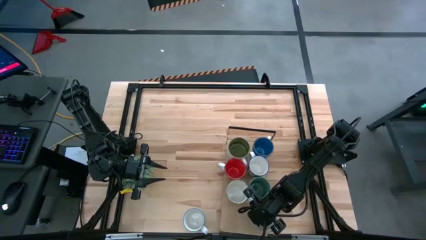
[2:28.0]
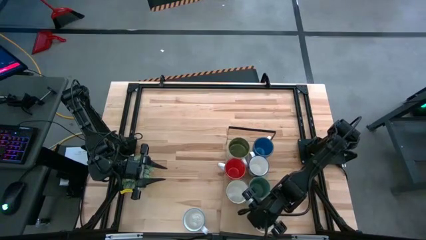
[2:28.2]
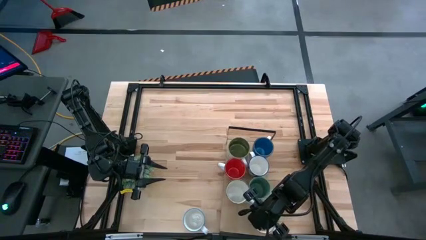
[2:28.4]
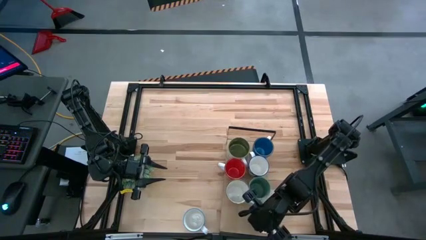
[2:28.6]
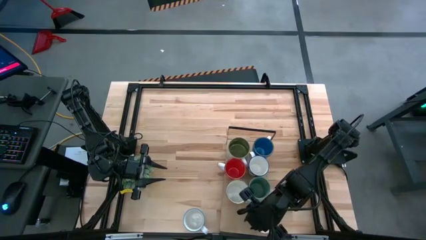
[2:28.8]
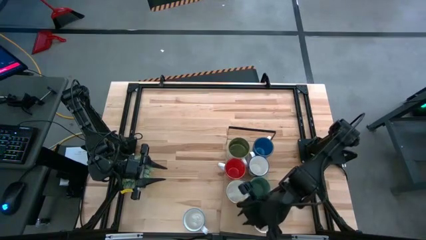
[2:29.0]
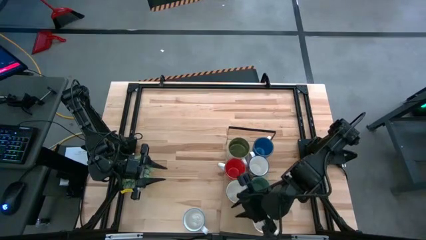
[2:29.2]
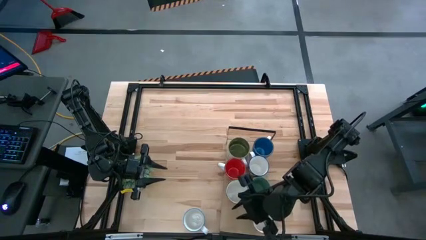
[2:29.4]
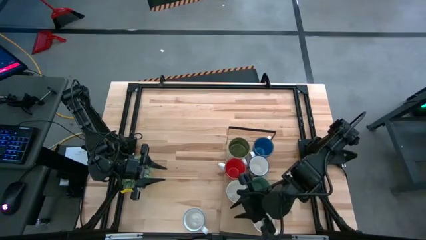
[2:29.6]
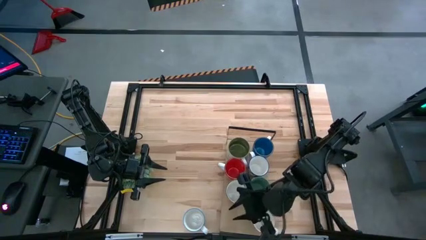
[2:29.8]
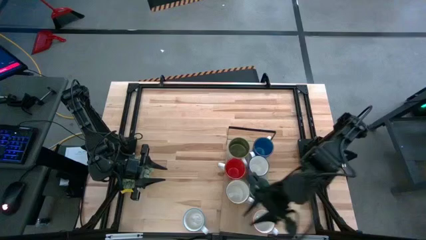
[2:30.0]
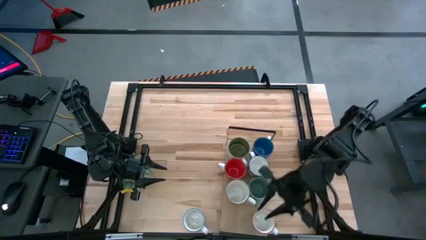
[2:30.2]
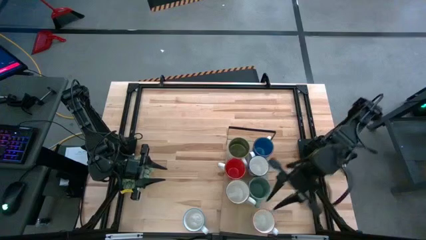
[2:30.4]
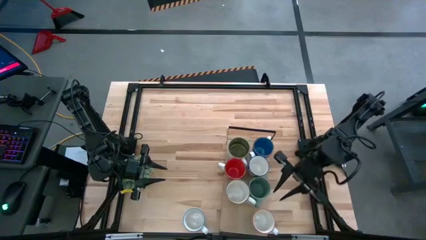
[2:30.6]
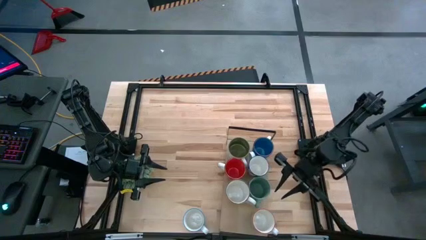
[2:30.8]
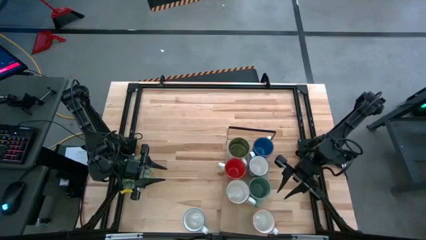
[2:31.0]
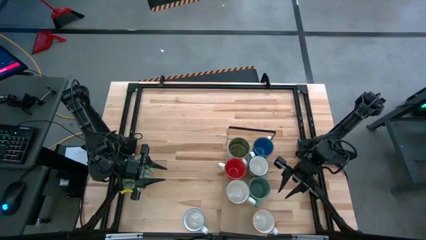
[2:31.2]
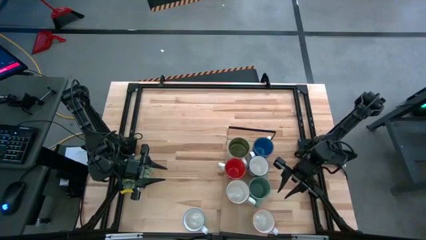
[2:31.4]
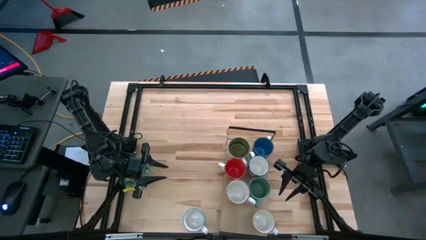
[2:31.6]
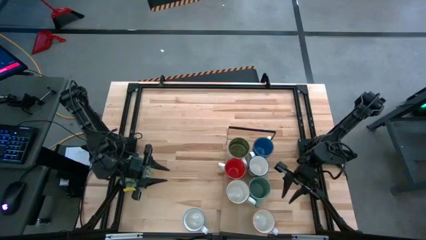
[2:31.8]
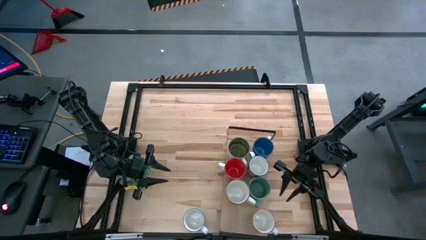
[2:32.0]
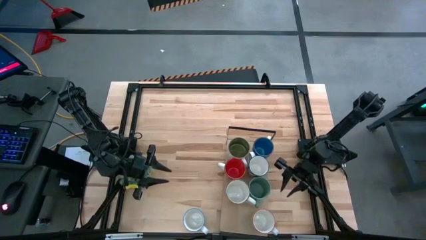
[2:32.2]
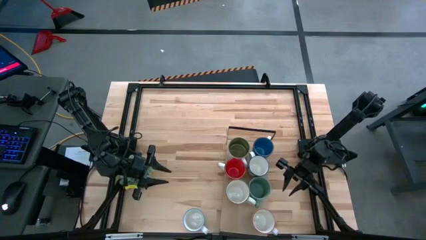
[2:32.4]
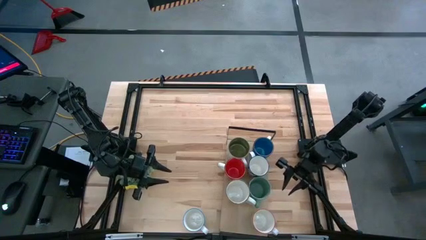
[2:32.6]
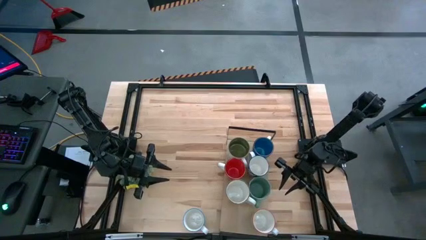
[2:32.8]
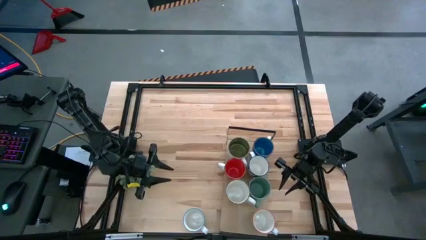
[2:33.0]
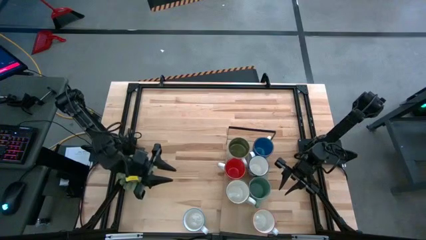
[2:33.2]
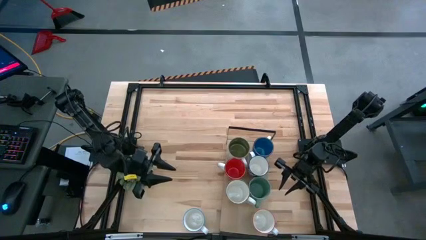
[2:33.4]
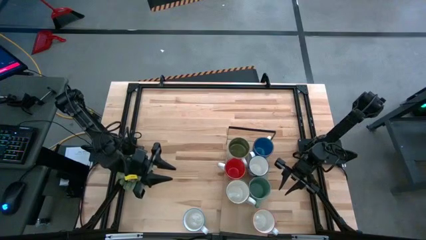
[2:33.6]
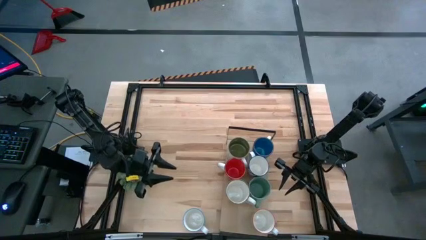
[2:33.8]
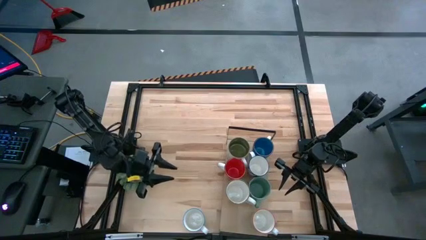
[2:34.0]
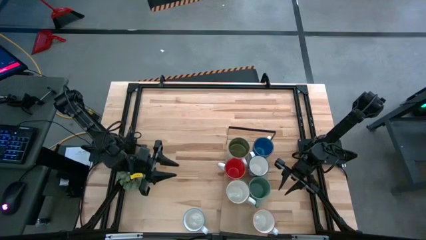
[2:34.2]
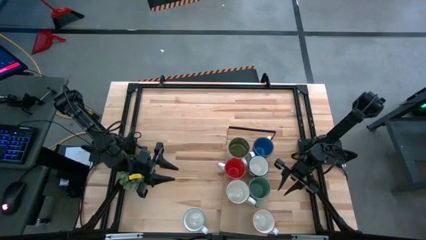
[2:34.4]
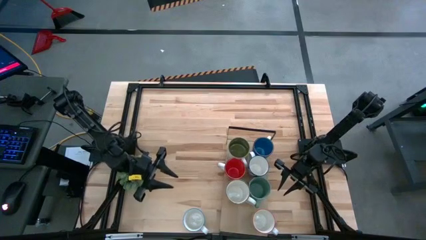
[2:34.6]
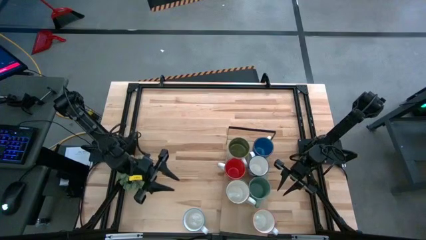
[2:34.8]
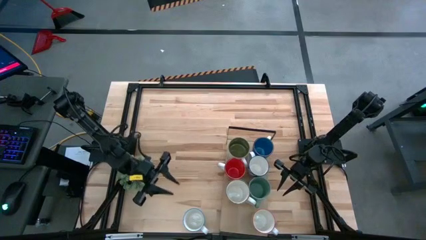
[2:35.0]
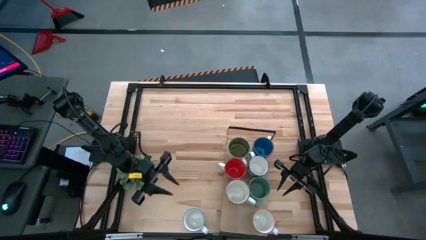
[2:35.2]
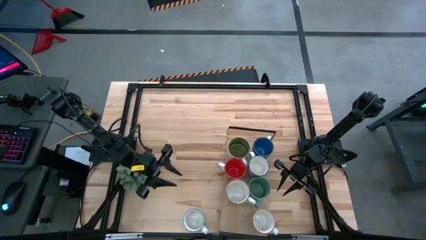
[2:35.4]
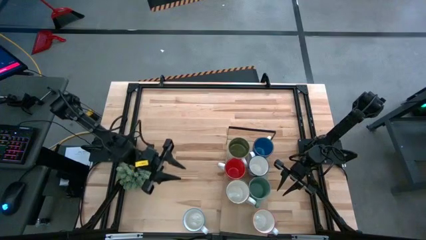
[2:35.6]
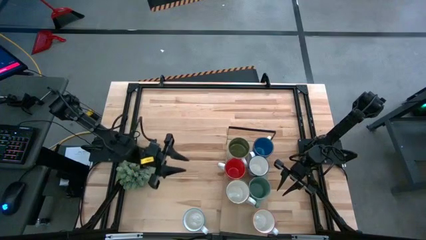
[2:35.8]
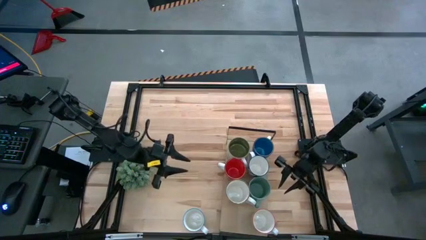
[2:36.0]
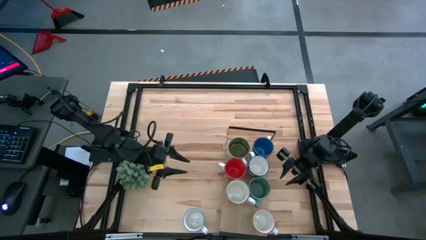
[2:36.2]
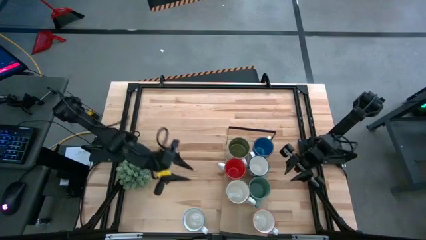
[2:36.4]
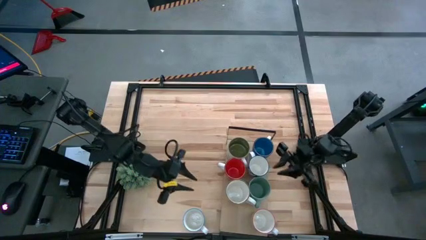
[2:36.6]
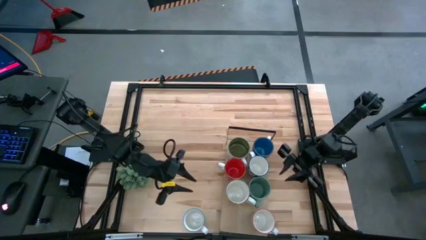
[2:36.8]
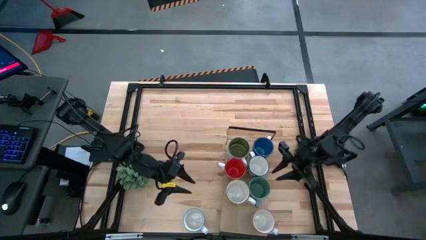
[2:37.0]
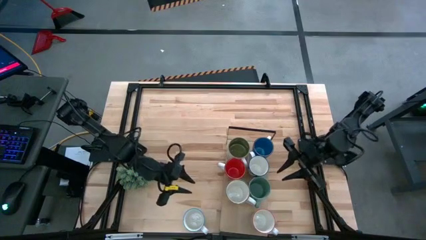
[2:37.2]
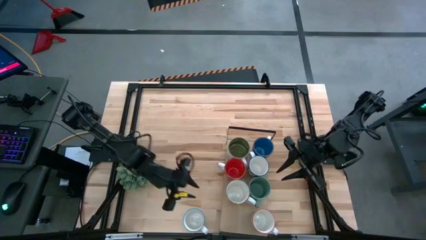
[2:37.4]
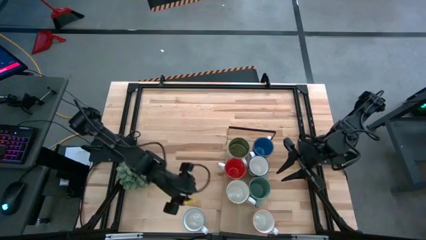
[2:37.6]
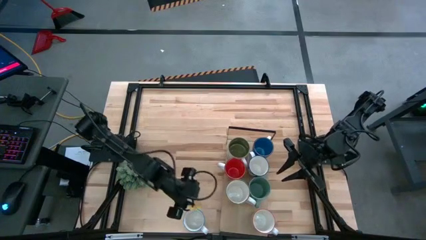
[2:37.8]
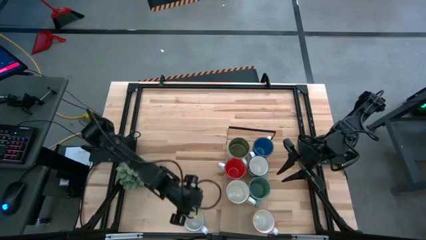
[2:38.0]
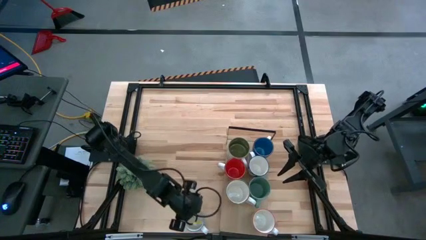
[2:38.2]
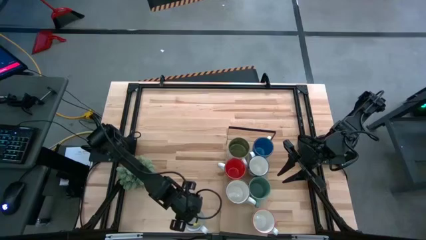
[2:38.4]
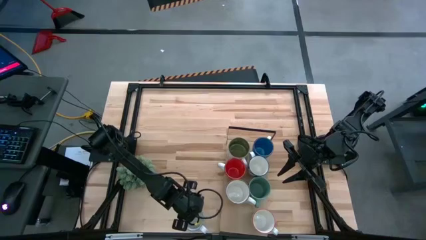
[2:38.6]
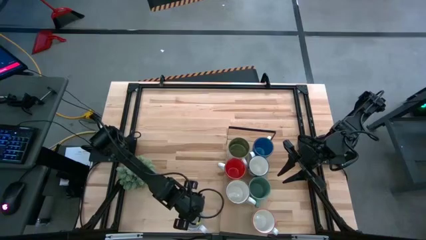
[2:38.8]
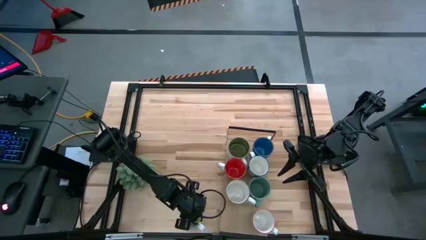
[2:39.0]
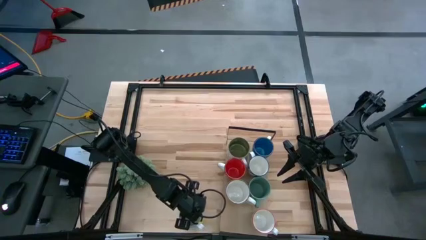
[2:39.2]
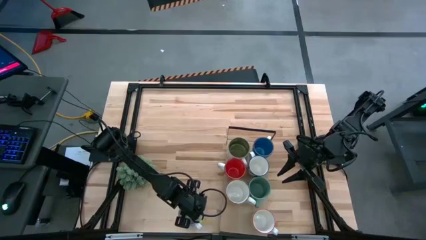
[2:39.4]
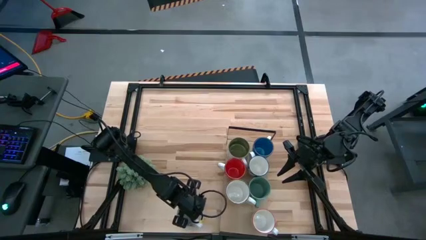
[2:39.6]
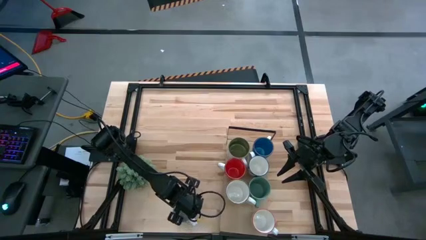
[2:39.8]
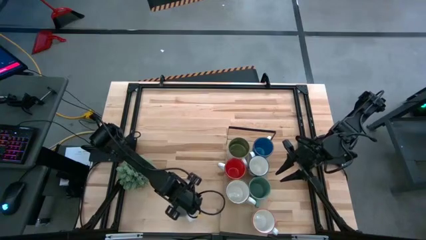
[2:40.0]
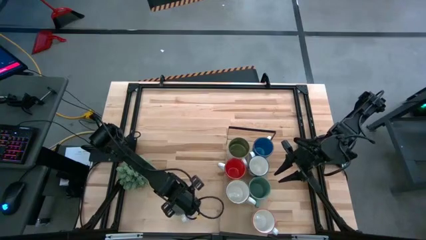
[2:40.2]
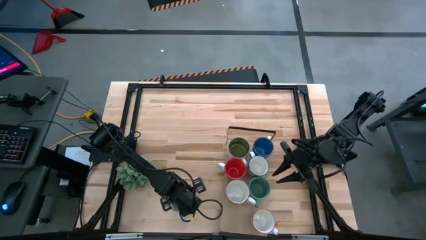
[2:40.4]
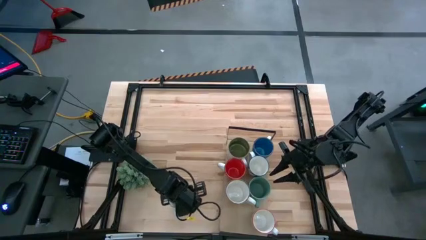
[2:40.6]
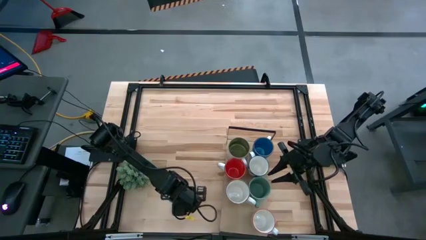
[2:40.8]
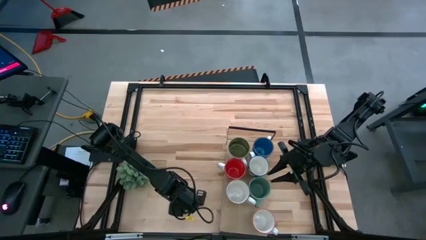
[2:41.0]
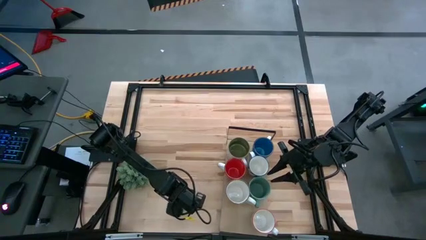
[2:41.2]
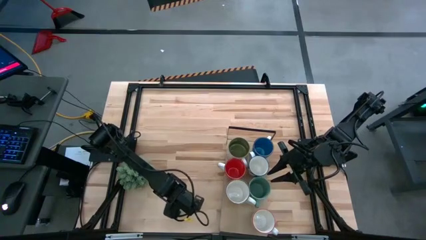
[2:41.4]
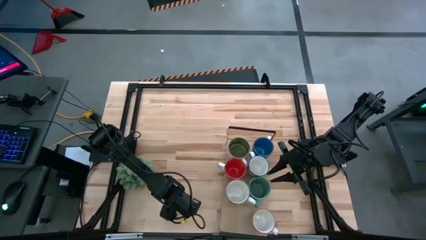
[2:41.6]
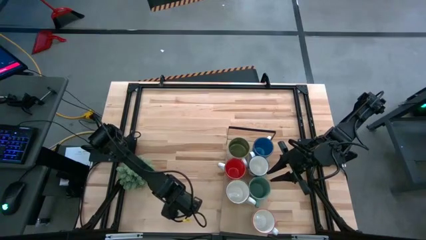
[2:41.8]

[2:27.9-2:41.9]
Task: Place coffee mugs
Put the red and white mug on the shelf

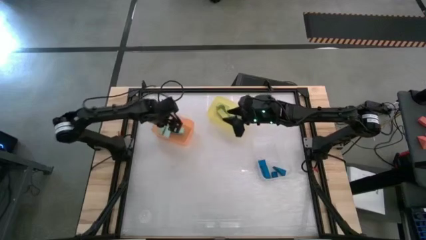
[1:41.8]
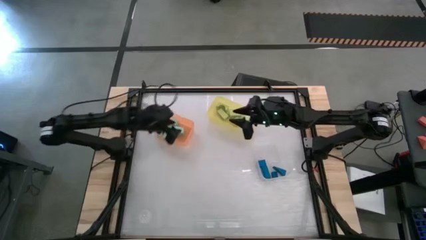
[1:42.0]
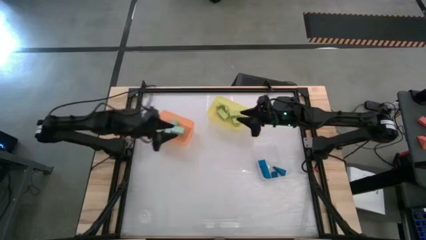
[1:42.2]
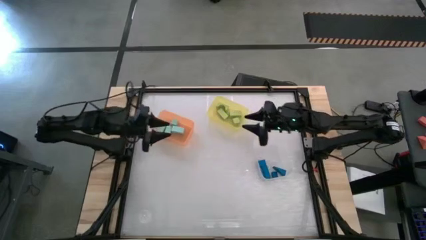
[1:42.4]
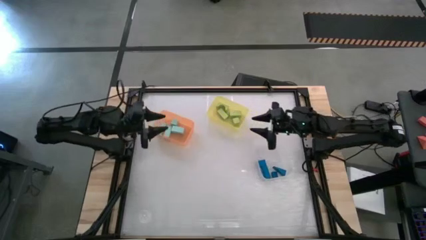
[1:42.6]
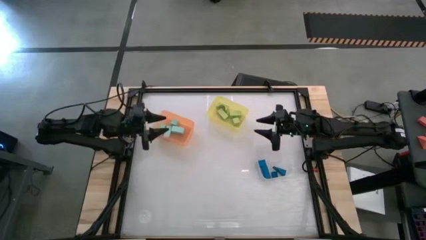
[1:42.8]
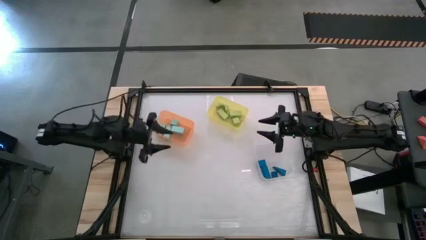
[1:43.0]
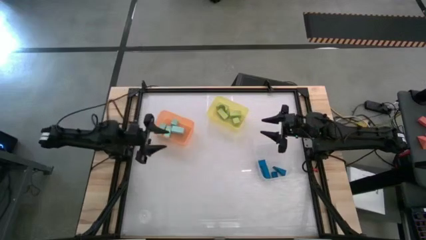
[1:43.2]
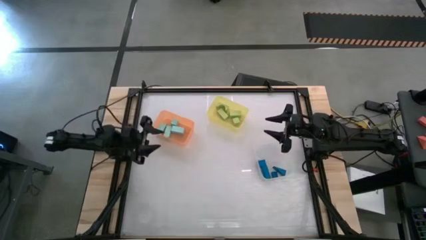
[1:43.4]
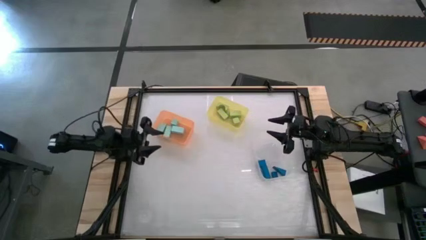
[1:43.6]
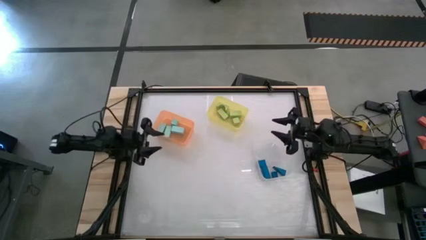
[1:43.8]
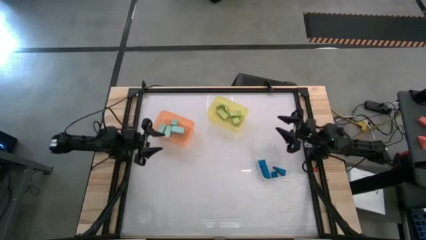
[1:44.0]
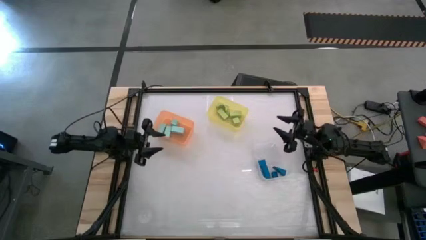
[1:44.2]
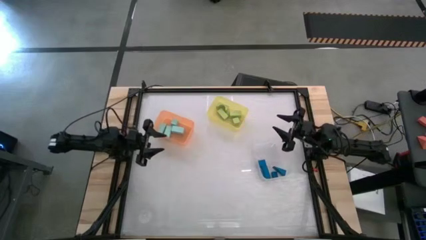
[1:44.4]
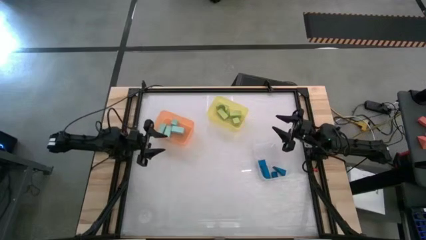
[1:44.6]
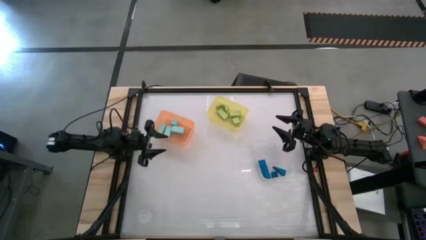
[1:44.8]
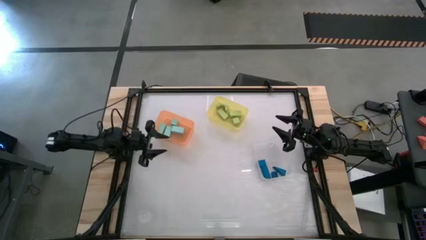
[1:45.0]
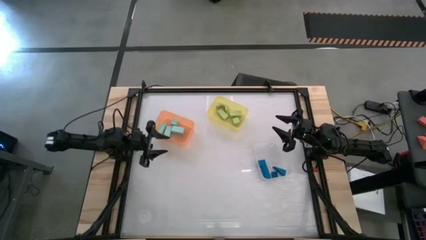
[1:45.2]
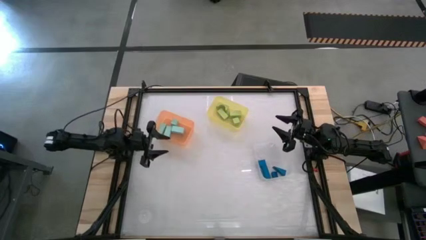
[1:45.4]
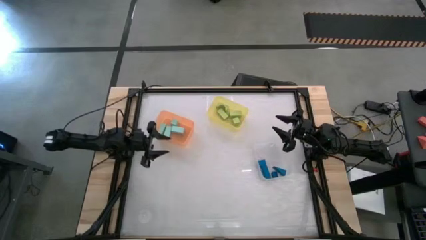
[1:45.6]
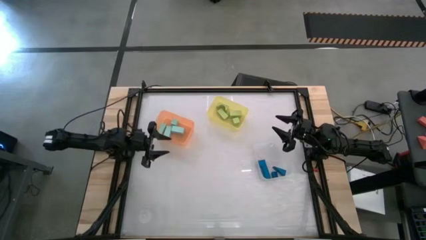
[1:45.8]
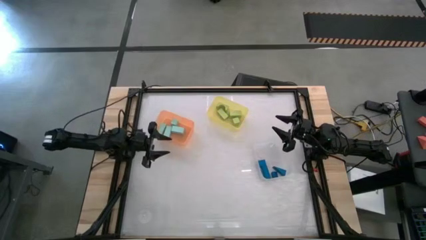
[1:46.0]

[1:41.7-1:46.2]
Task: Sort & place blocks by color
Return to Home Position
